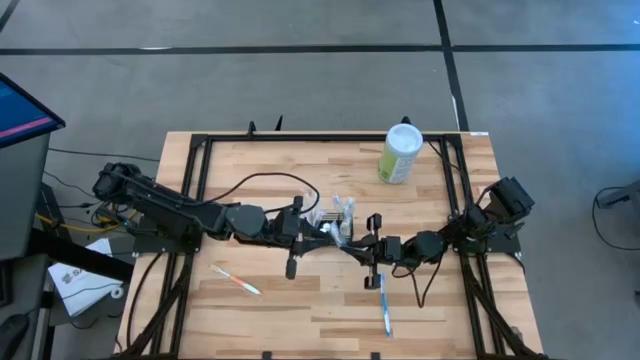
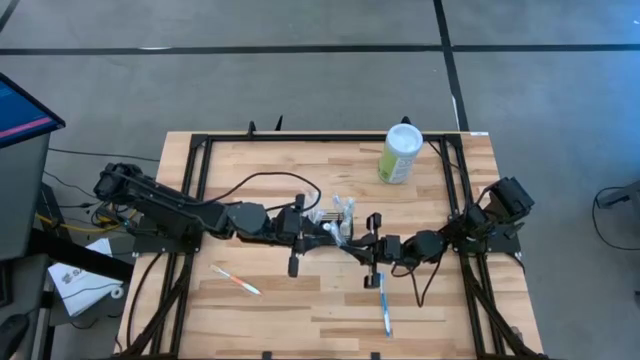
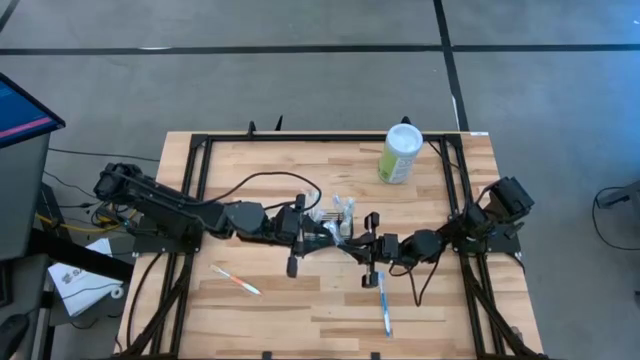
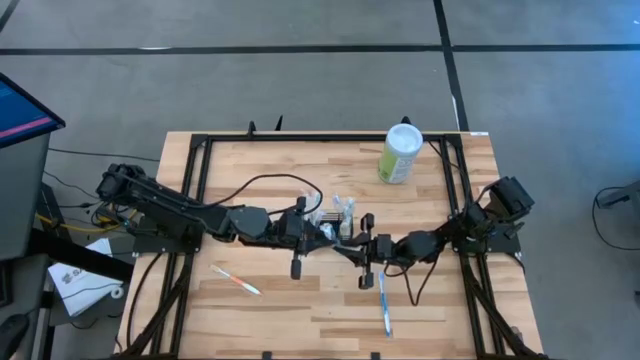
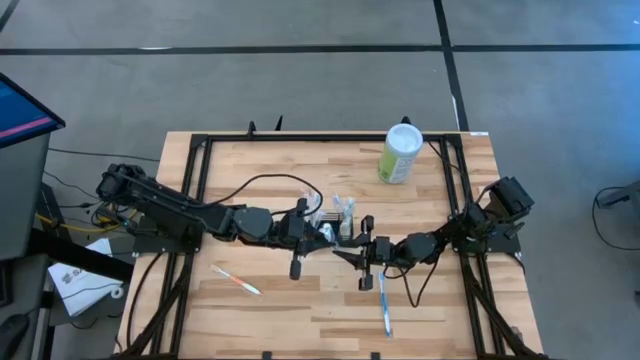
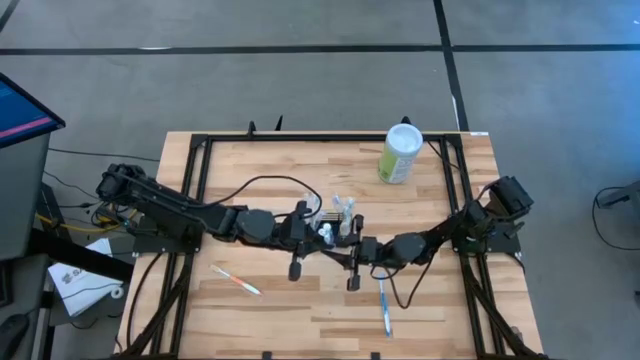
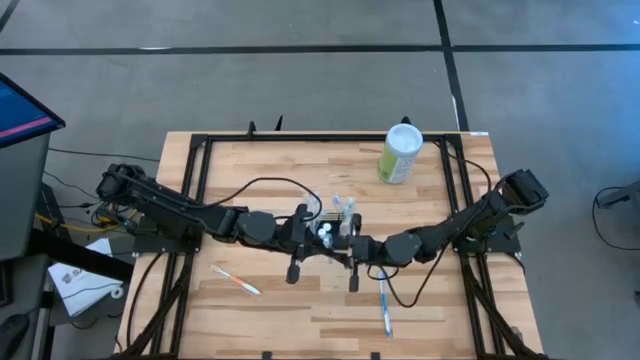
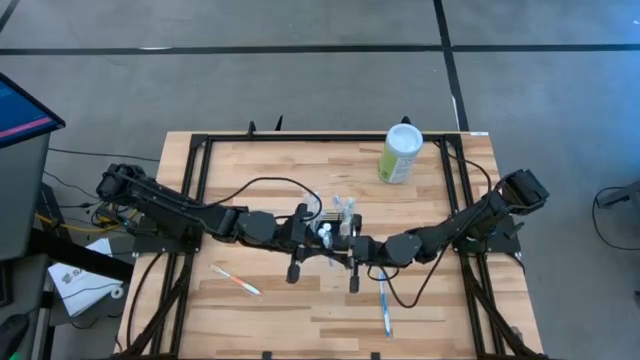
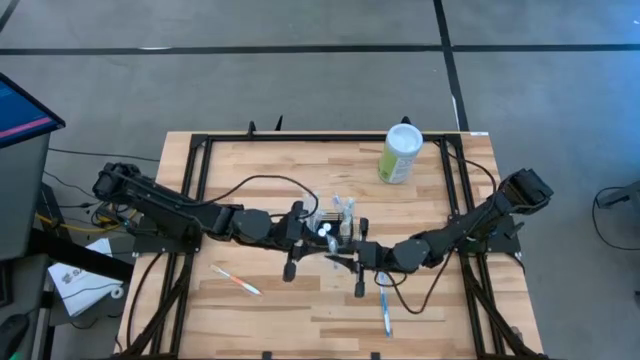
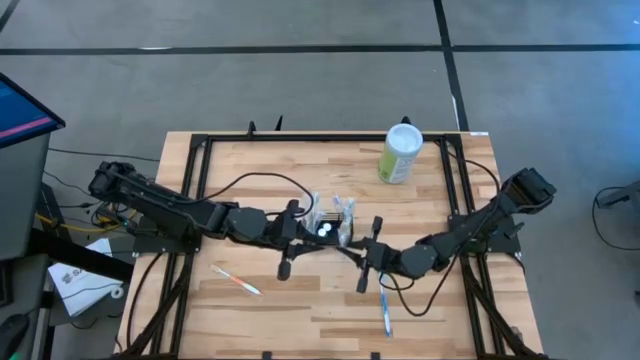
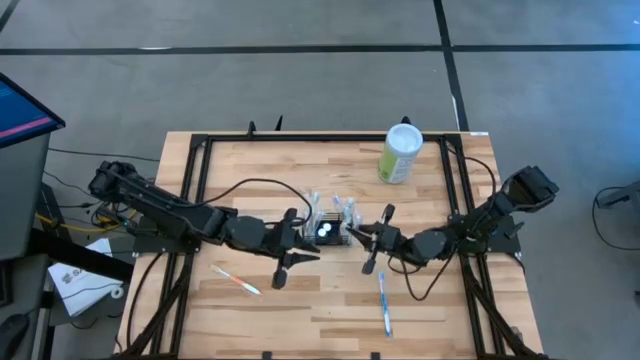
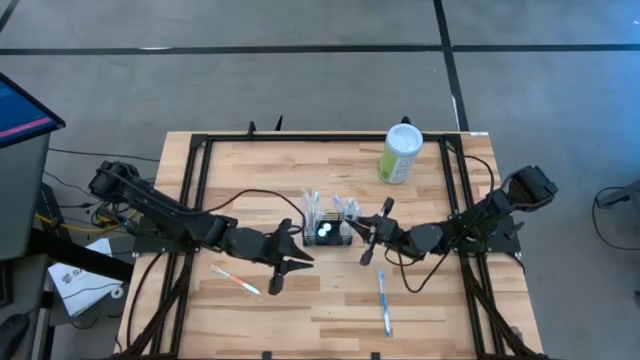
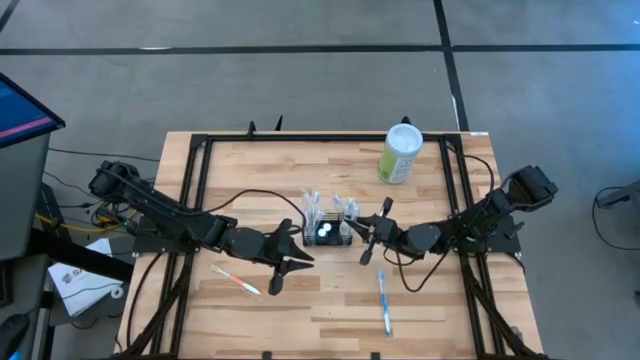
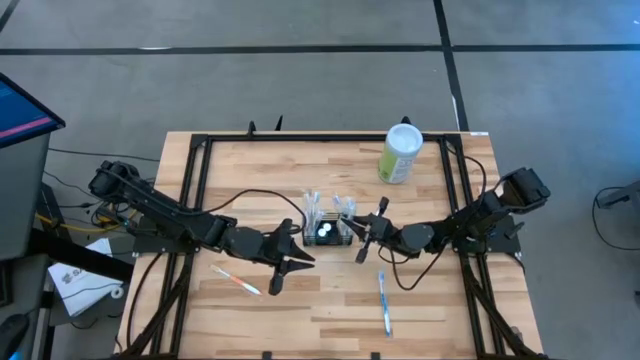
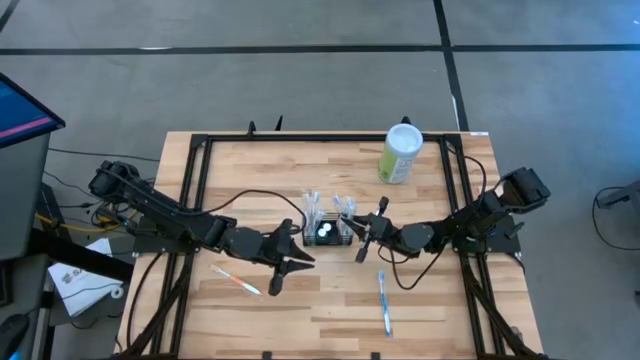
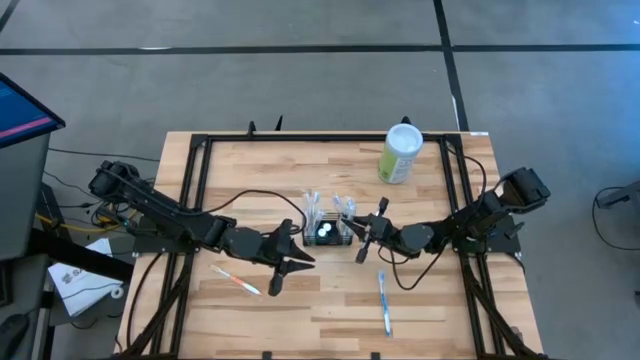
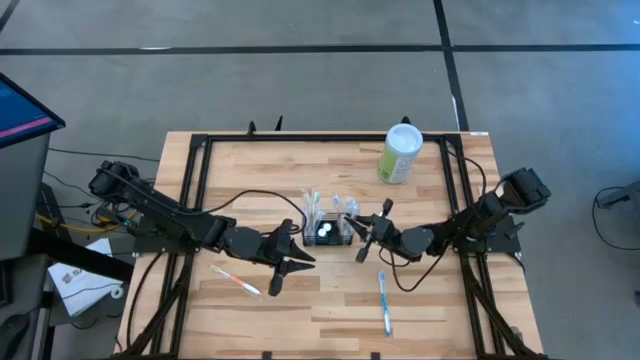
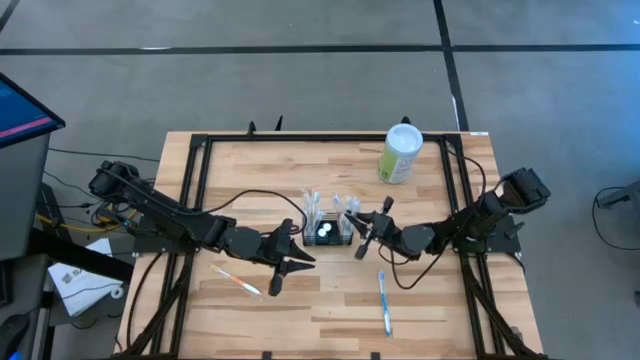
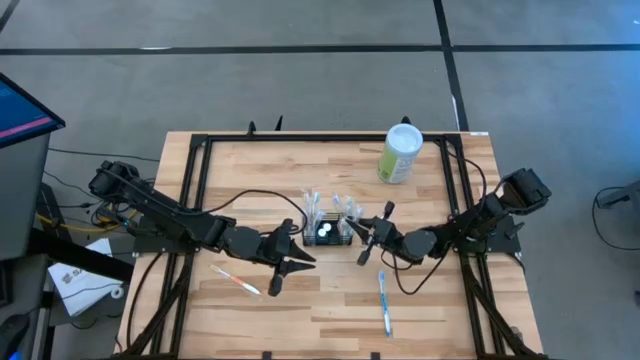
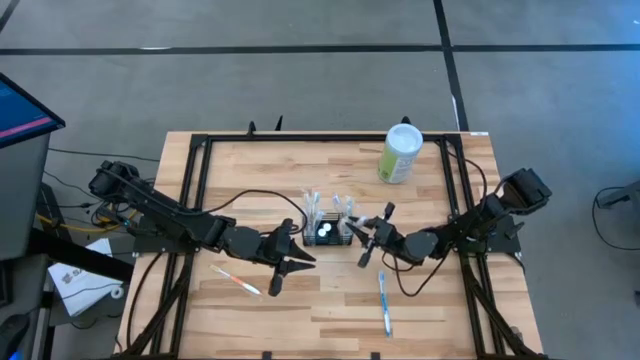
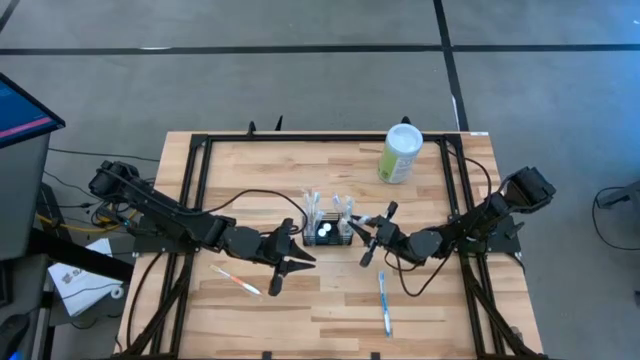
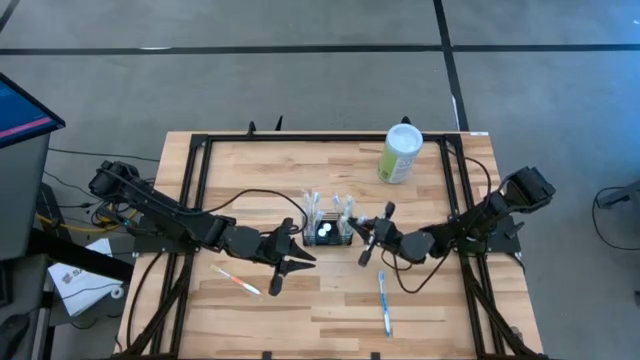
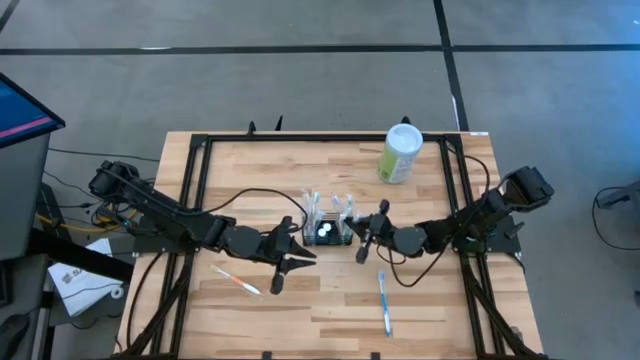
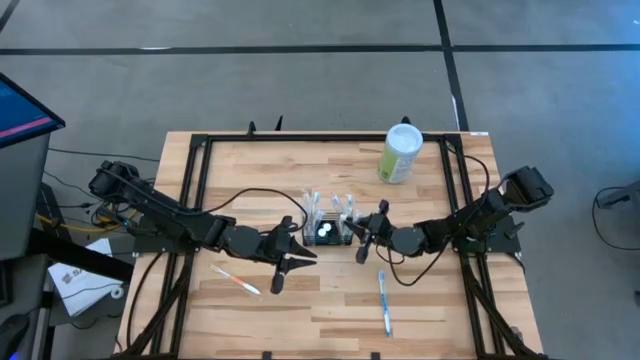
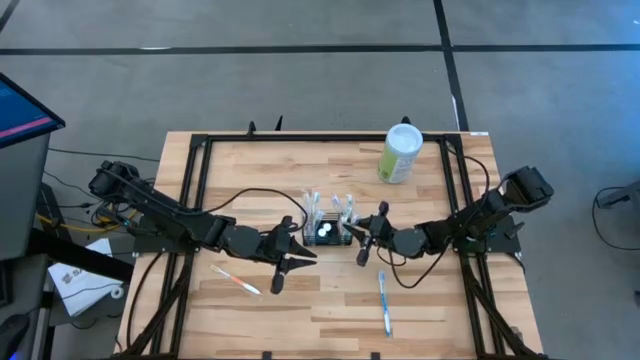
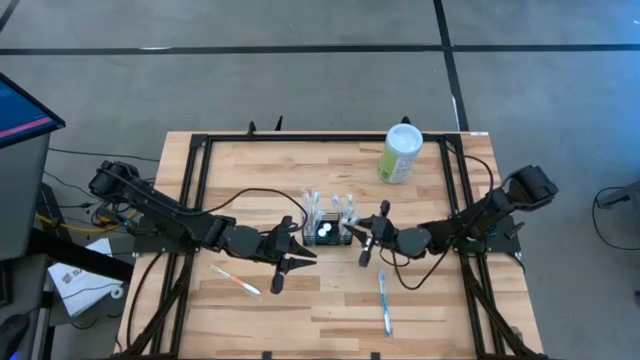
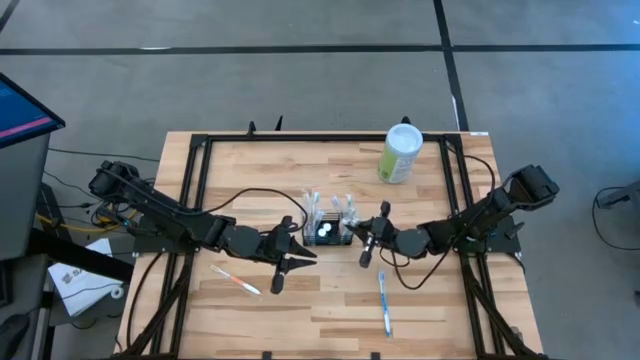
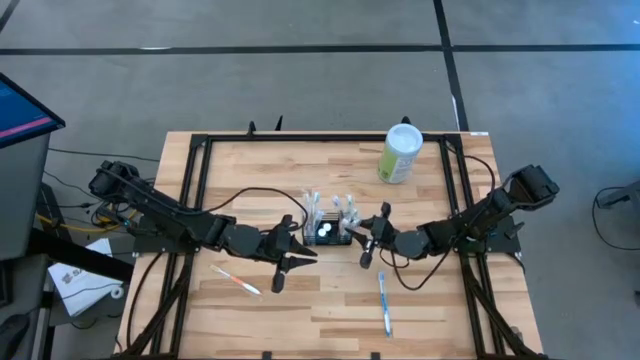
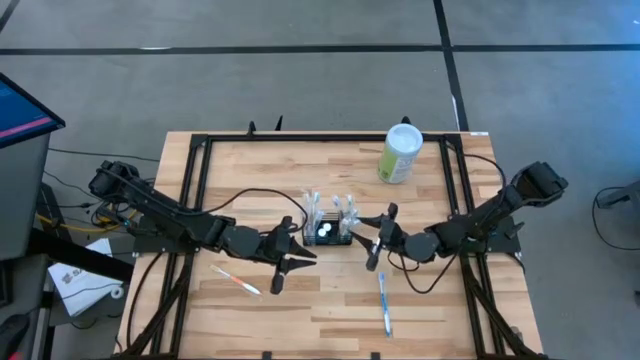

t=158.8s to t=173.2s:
Task: Pick & Place toothbrushing station
Put the left blue toothbrush into the right compartment of the organizer

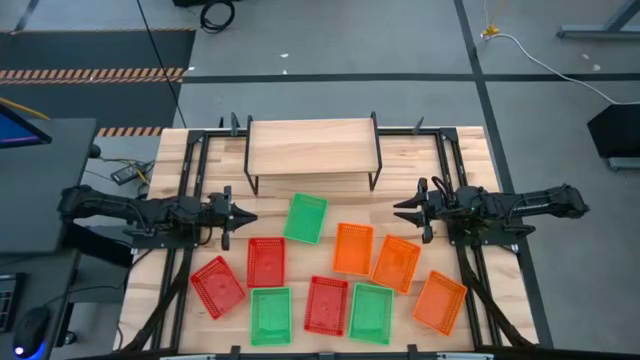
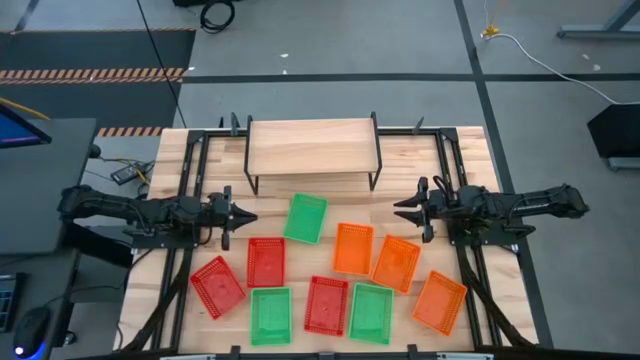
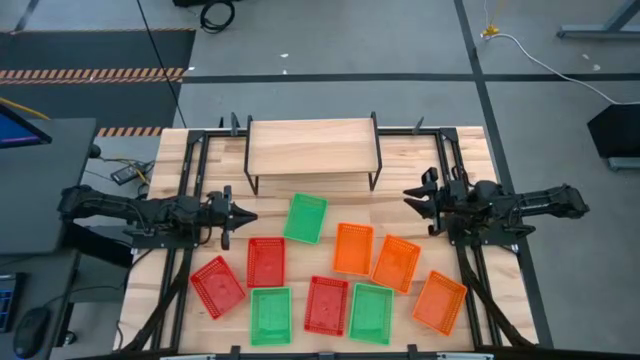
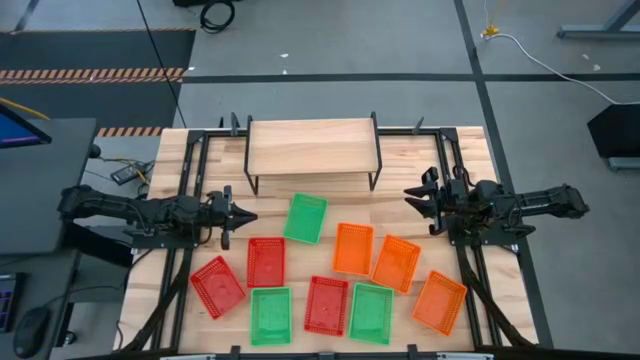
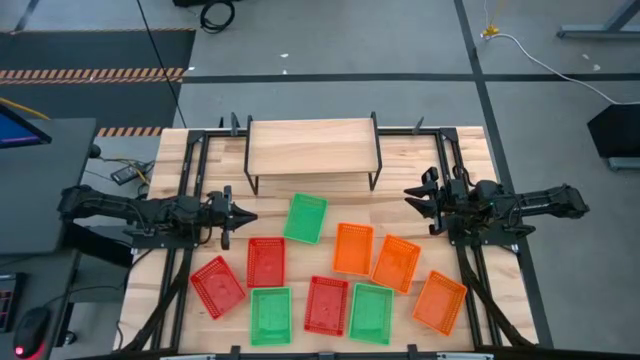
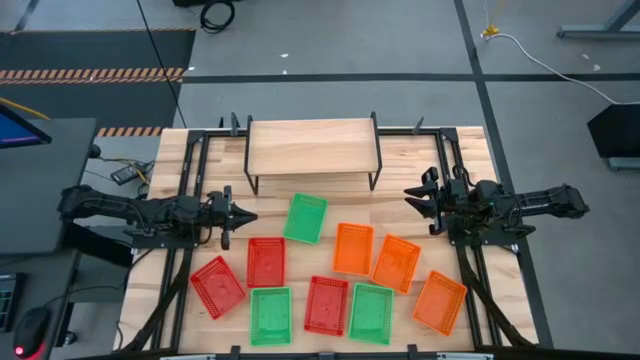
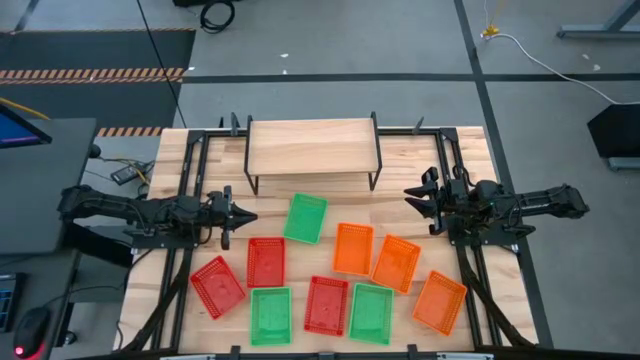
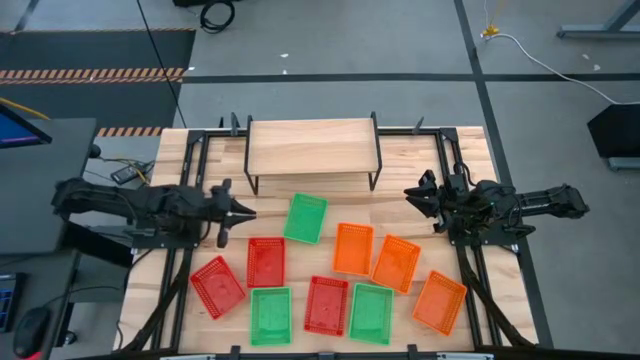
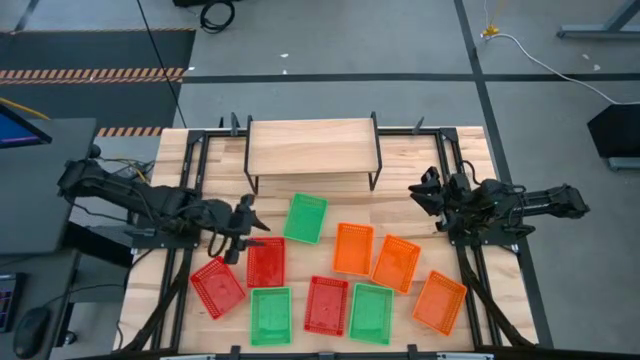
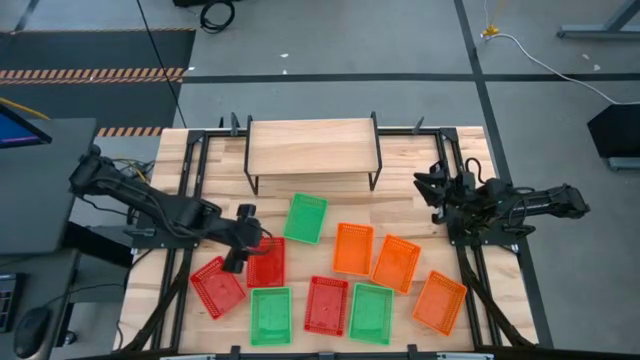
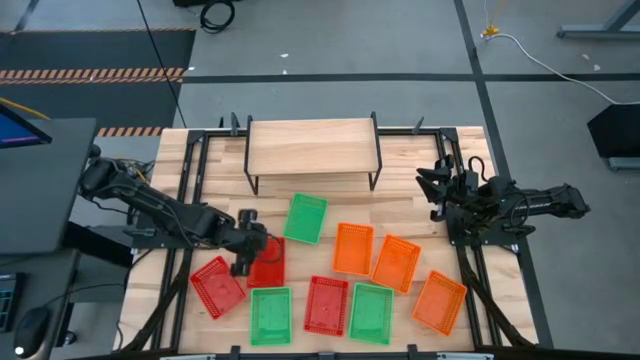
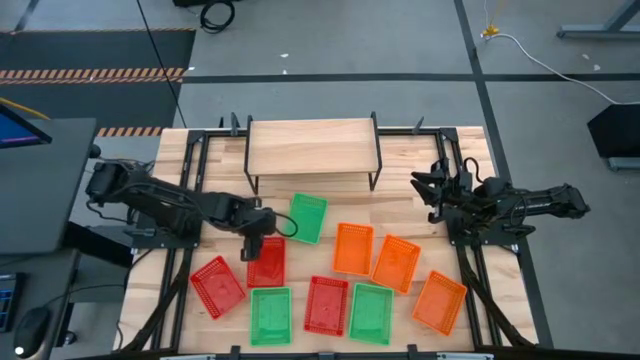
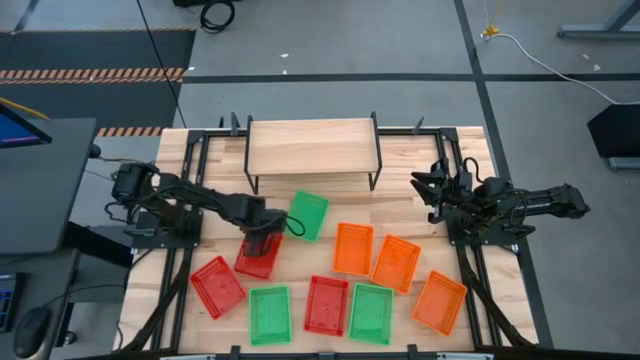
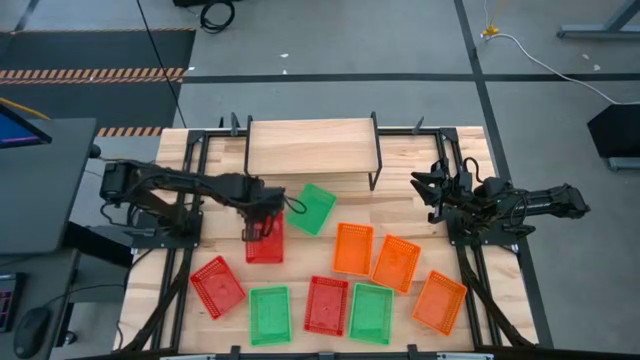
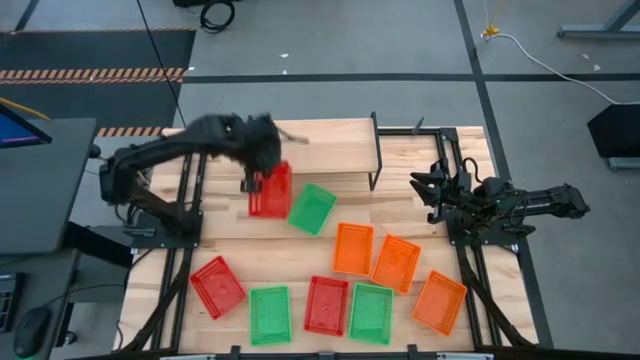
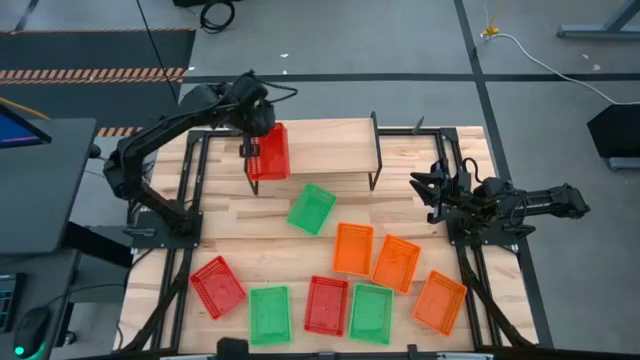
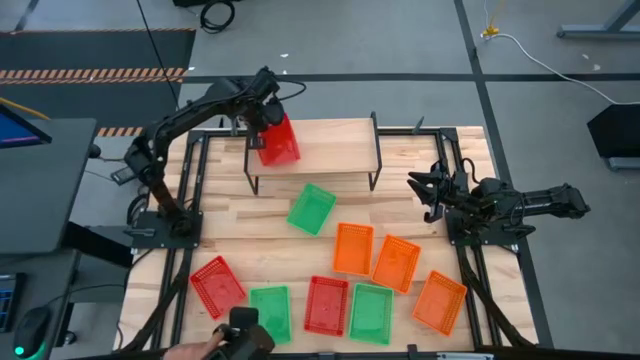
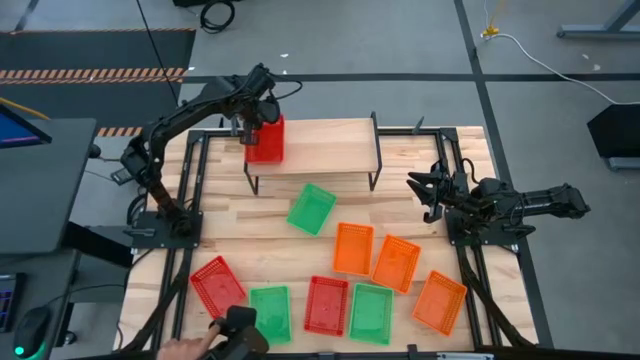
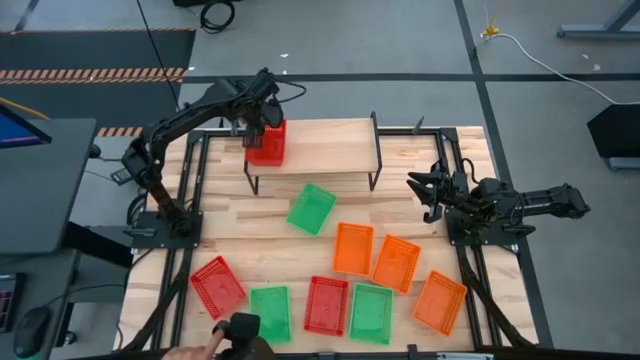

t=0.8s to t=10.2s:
Task: Stack baskets on shelf by color
Put the top red basket on the shelf
